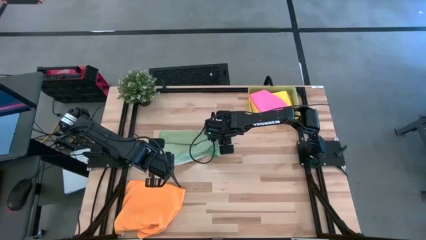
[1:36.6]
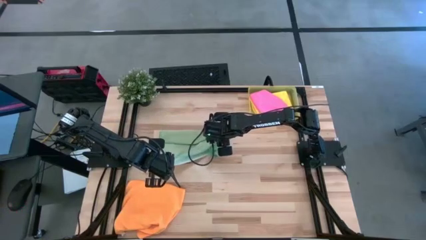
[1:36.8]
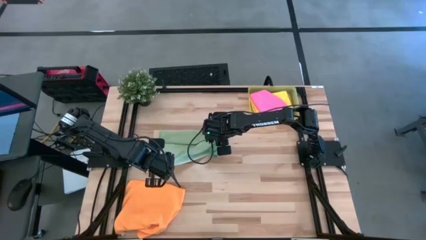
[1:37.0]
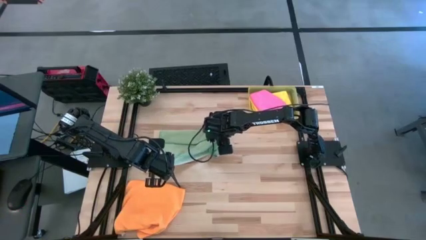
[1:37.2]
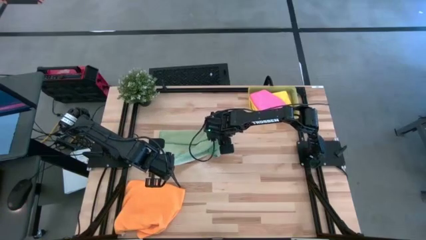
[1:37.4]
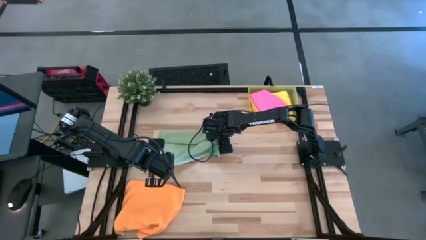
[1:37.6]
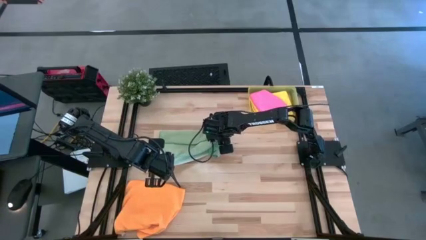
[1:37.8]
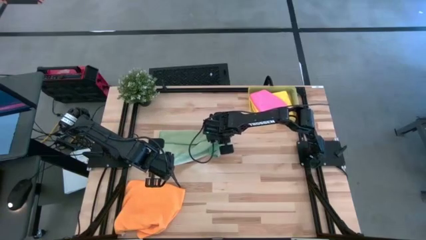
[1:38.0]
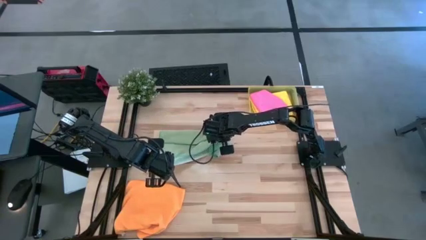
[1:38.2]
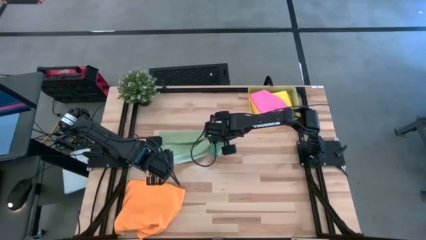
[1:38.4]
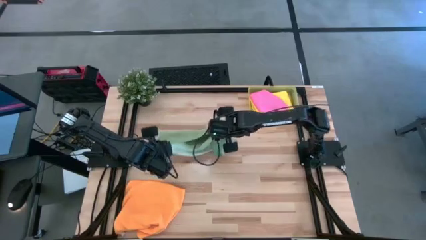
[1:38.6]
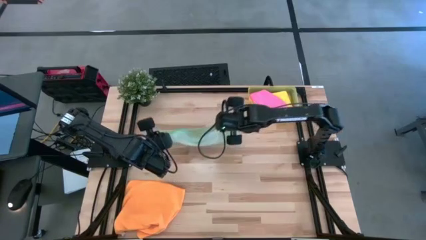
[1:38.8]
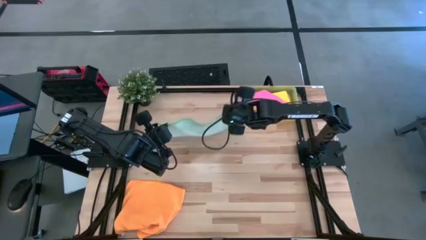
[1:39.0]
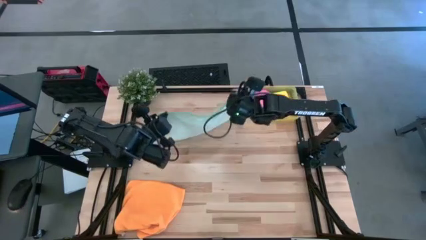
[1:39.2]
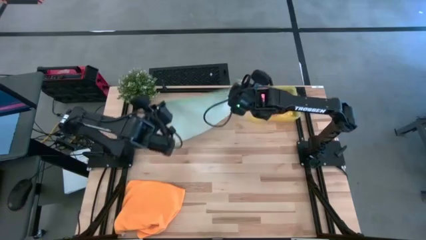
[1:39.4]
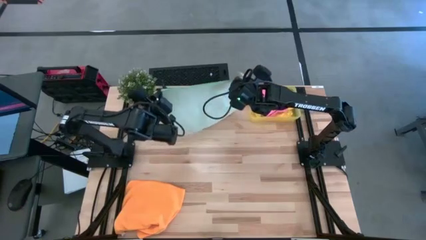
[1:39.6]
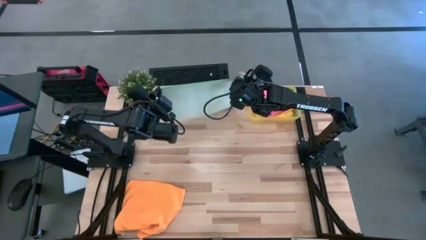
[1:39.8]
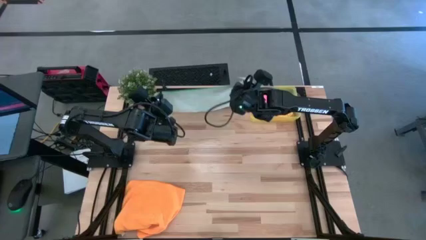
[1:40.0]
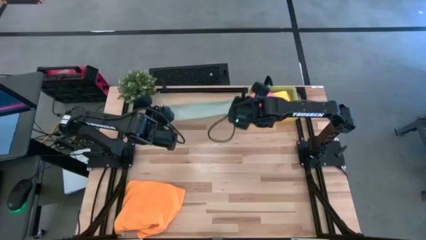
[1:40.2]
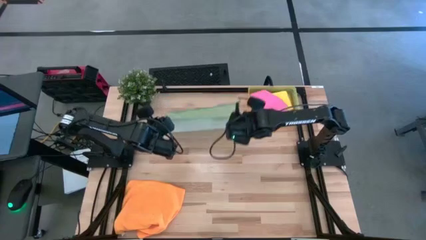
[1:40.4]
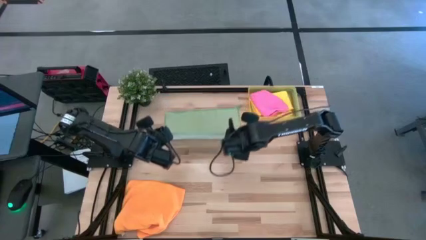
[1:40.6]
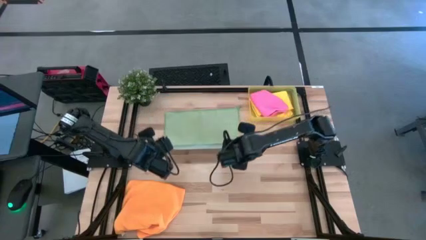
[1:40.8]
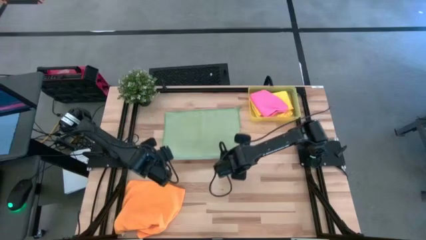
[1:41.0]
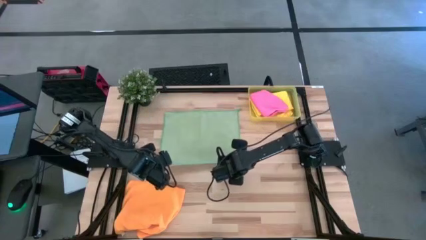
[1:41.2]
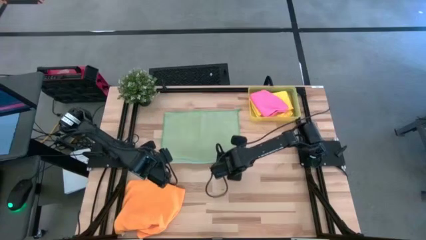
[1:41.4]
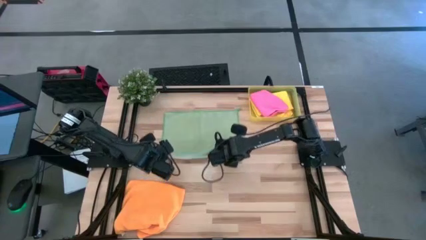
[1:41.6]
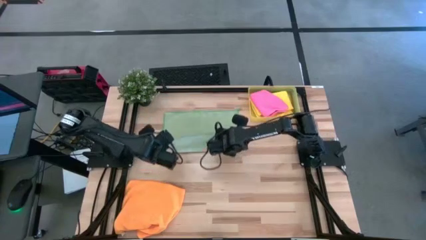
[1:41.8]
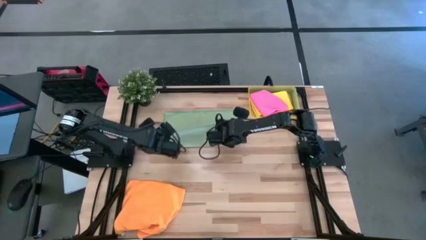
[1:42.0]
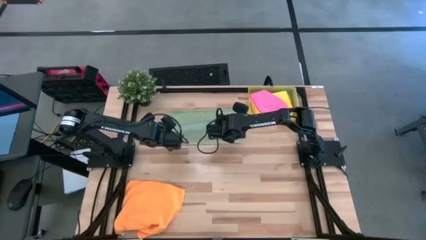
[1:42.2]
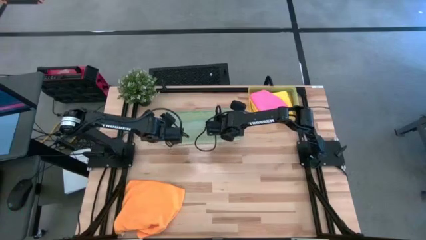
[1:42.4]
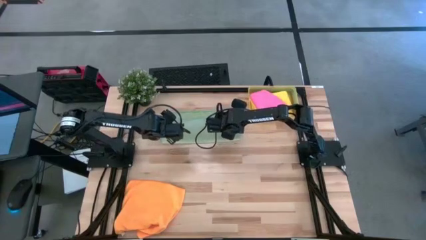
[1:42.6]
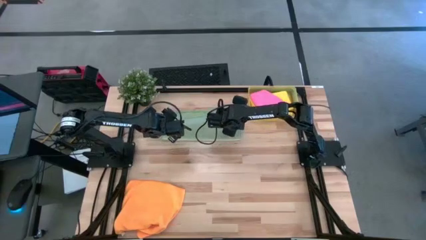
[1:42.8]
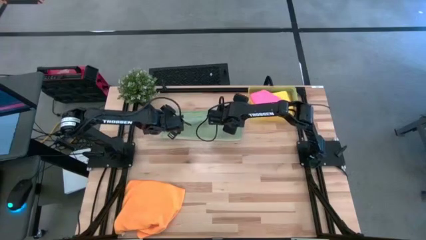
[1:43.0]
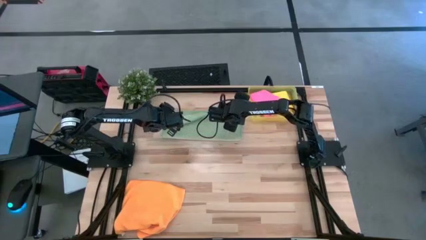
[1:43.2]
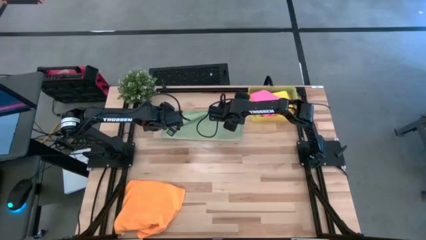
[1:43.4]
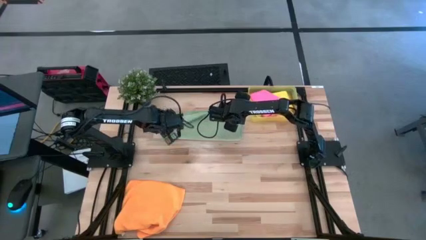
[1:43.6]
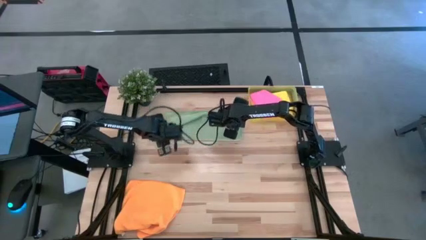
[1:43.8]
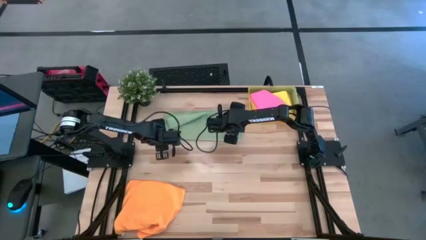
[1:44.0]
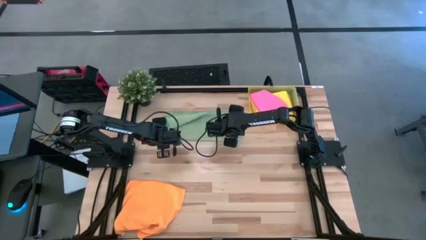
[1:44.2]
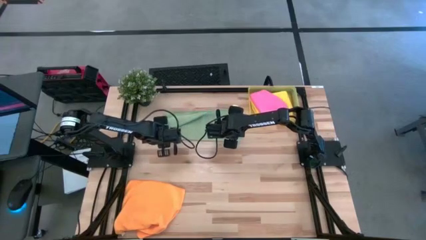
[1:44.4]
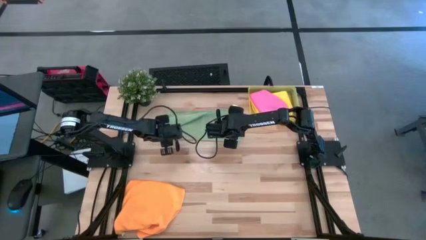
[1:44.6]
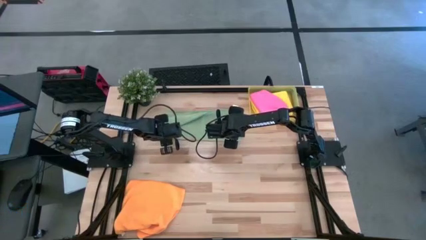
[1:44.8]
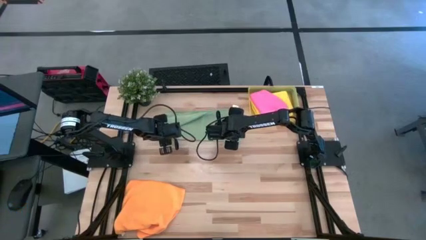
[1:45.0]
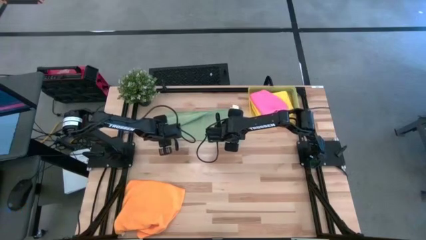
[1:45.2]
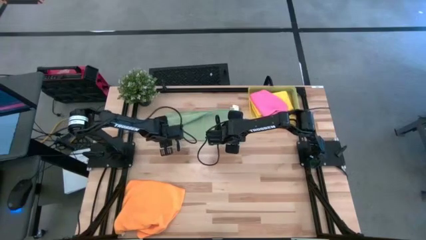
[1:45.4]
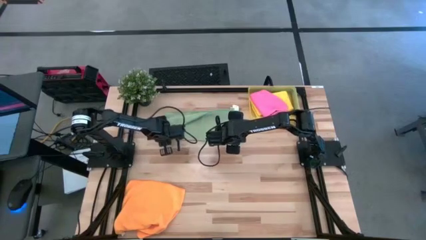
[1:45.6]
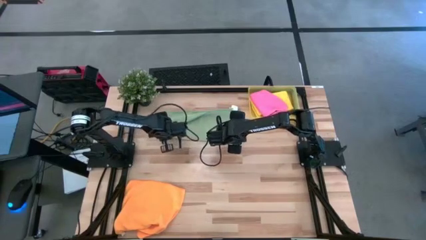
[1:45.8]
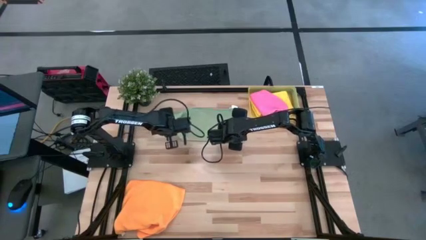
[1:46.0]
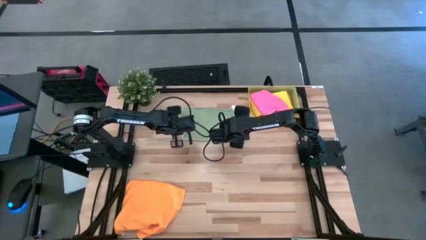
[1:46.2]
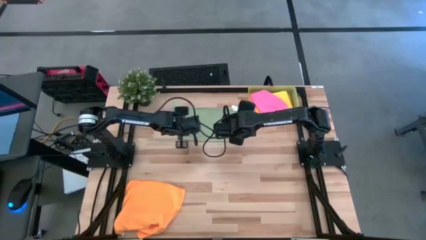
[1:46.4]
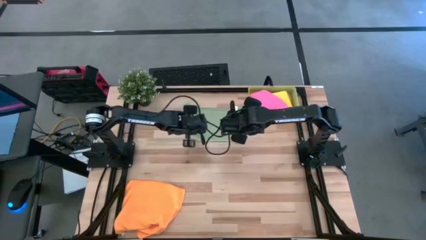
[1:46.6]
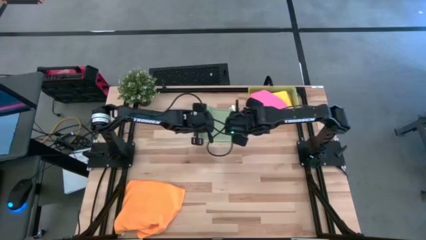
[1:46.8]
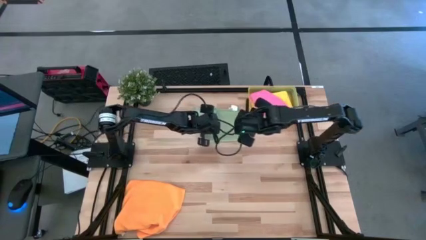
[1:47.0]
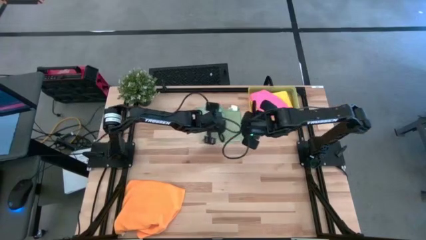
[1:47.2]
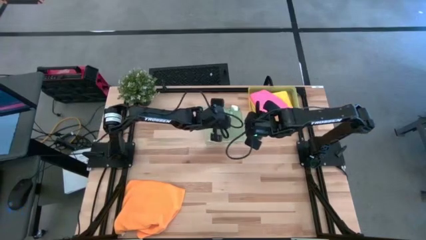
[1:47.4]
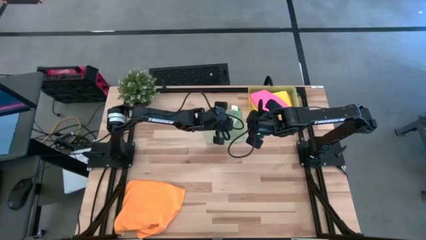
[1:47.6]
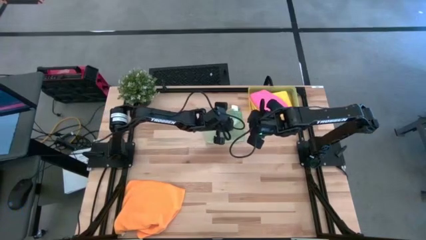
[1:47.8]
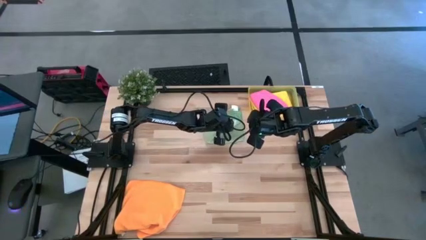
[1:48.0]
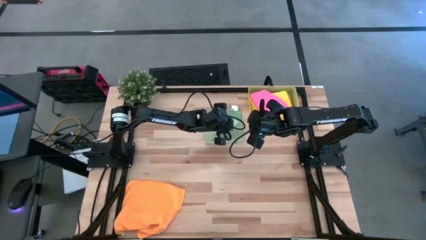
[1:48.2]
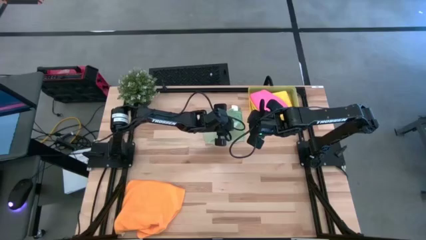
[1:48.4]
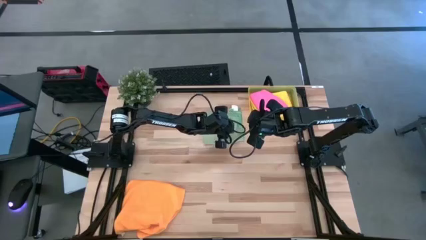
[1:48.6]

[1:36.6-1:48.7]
Task: Fold microfiber towels
Fold the light green towel

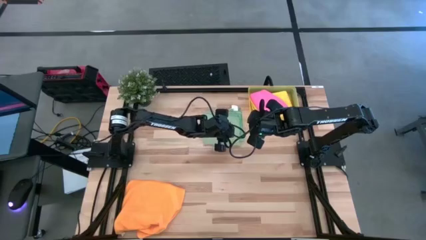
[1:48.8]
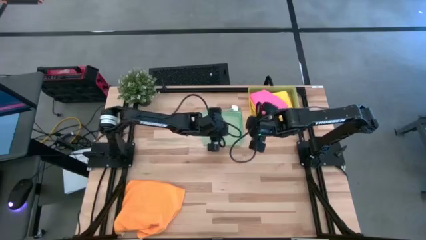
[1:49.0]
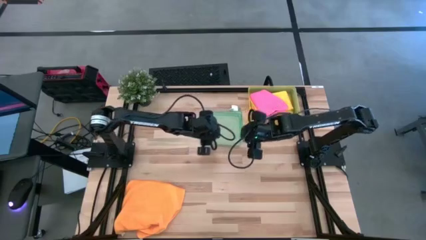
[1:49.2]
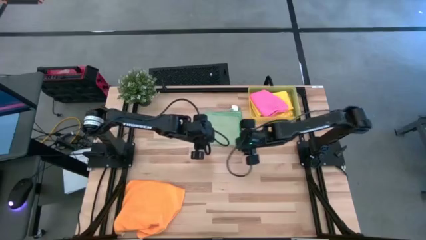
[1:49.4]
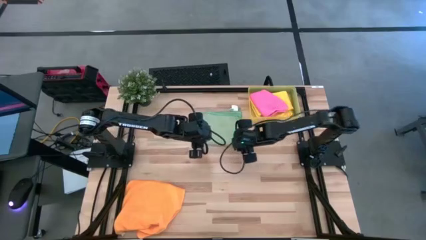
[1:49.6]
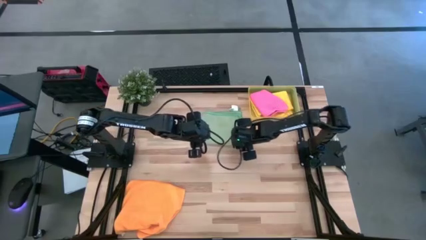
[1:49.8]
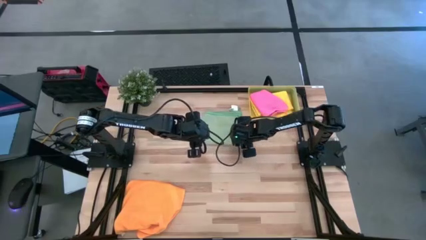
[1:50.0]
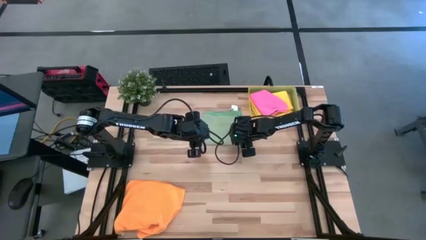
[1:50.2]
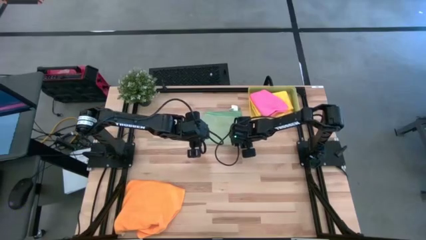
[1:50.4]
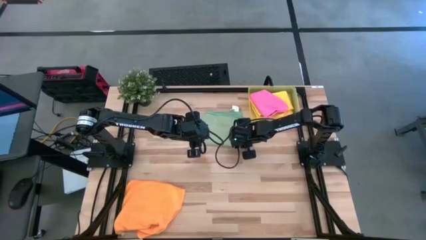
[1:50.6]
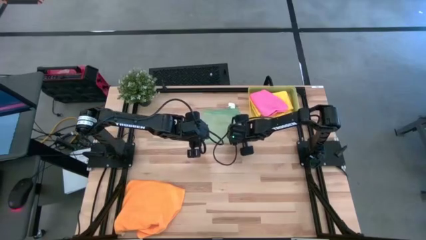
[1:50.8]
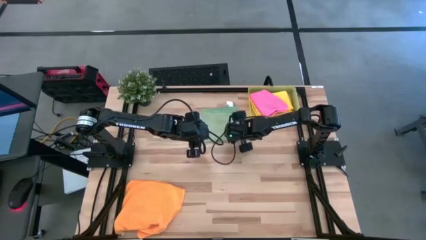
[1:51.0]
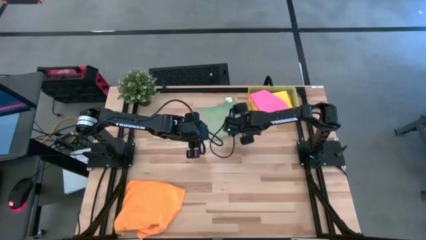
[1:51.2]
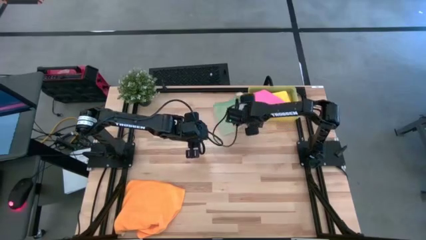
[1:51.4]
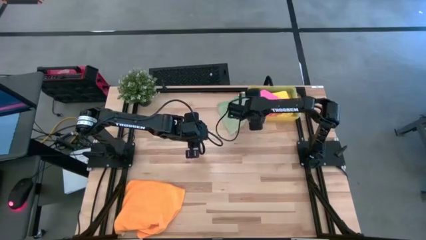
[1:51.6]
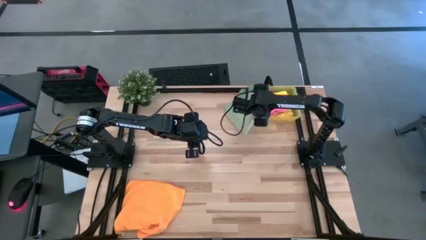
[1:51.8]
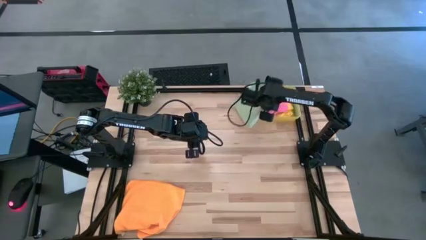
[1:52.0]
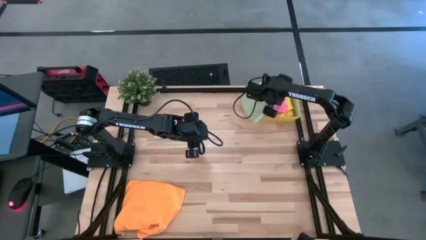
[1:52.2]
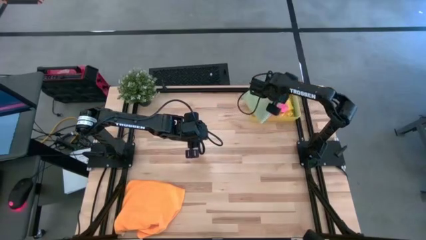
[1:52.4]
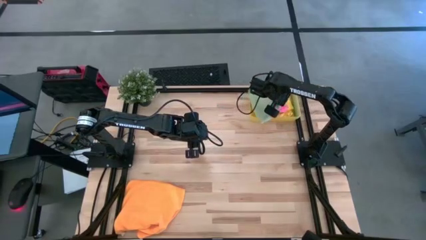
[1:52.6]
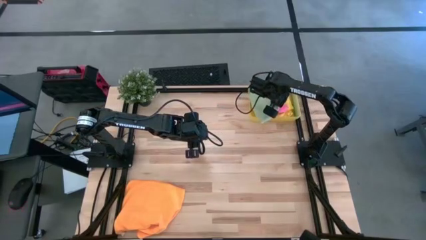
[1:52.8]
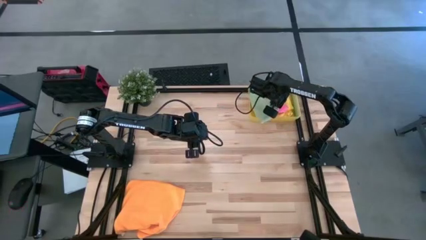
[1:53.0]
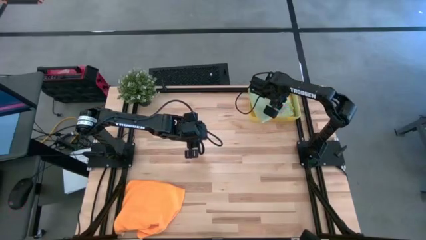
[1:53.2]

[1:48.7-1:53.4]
Put the light green towel into the bin

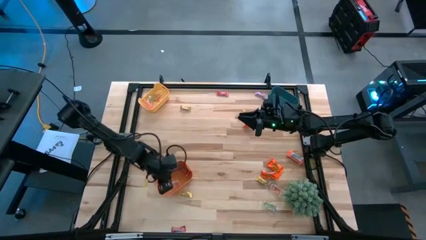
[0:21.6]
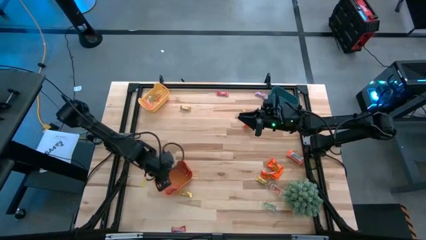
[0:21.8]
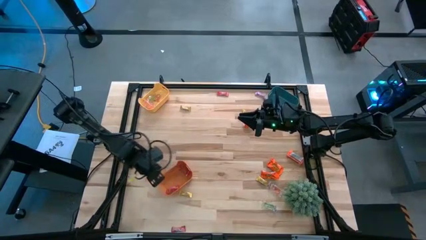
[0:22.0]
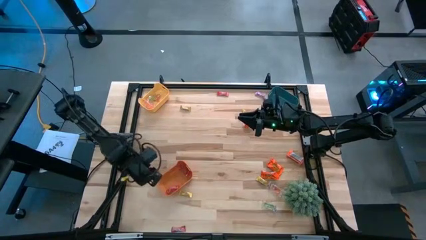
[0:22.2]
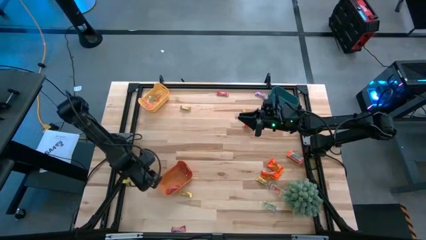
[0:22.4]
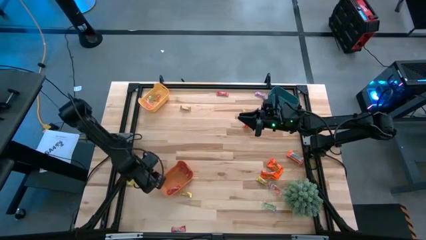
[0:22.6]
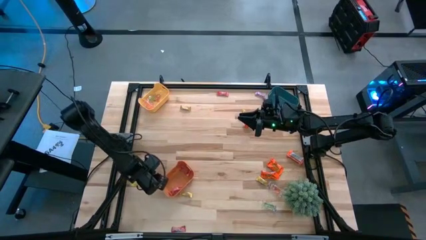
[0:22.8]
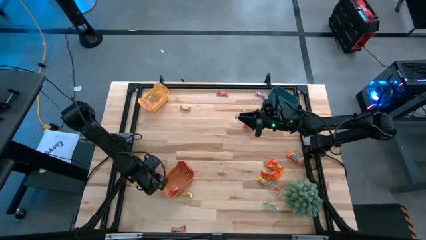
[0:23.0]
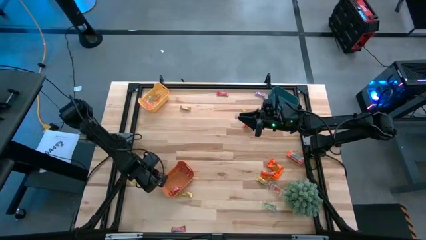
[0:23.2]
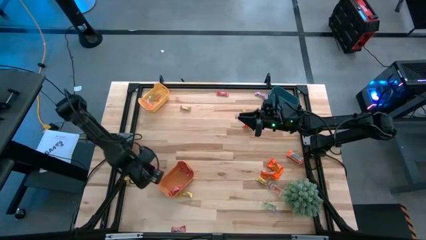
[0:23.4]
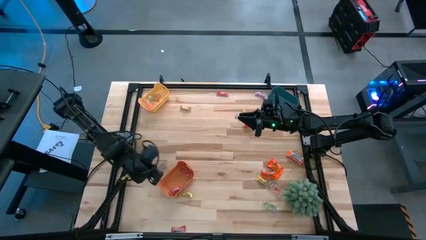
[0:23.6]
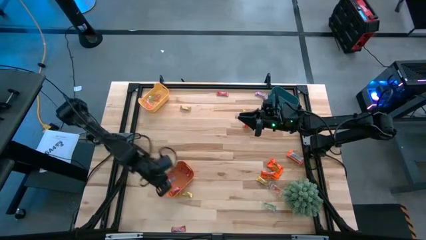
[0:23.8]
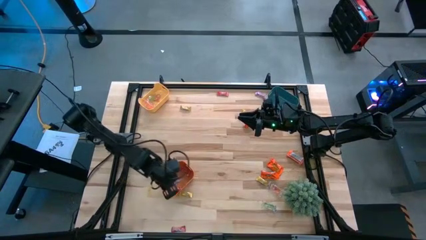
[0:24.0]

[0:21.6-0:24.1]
Task: Sort candy
Put the bottom pink candy into the orange bin
